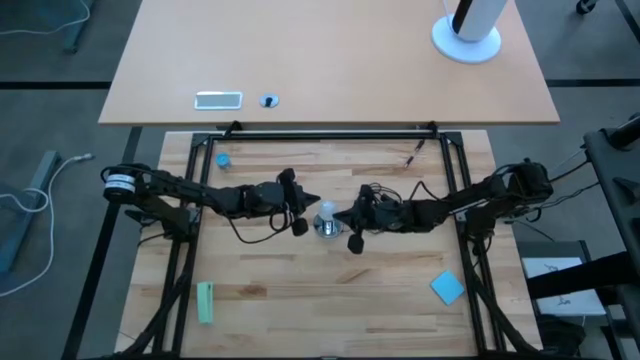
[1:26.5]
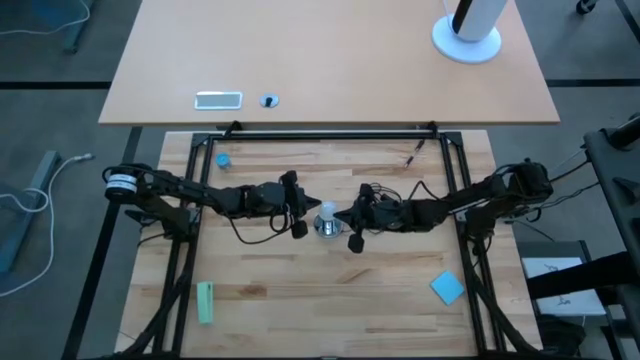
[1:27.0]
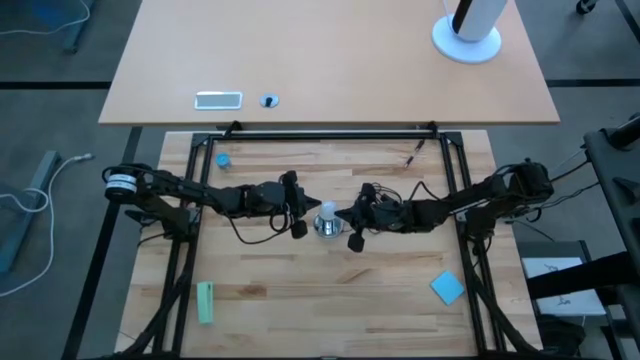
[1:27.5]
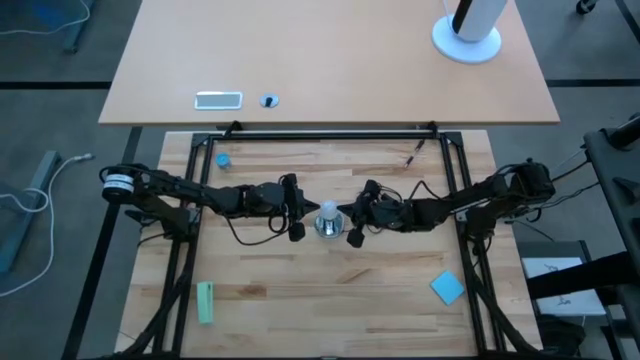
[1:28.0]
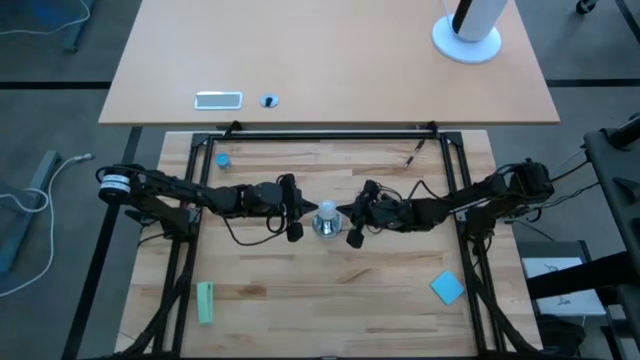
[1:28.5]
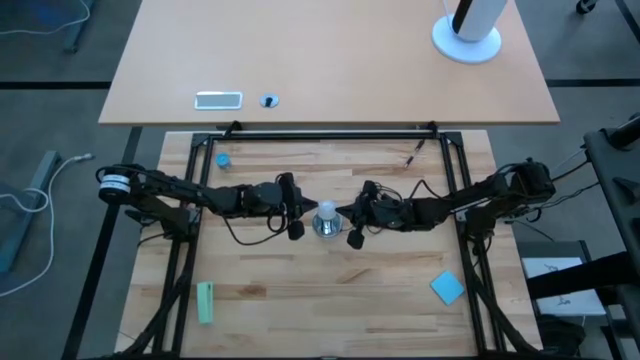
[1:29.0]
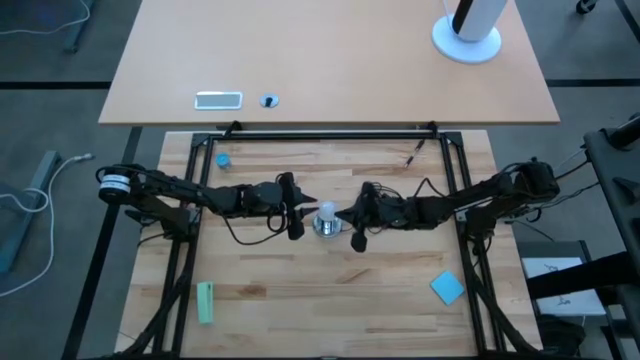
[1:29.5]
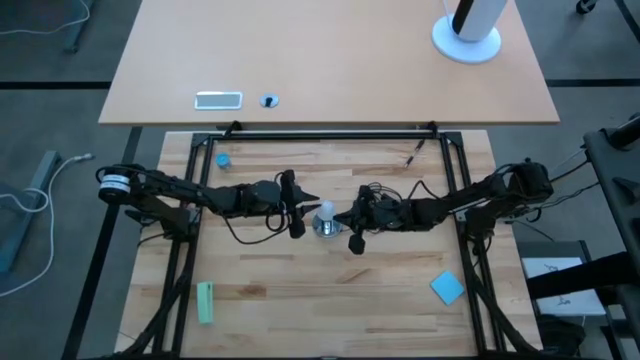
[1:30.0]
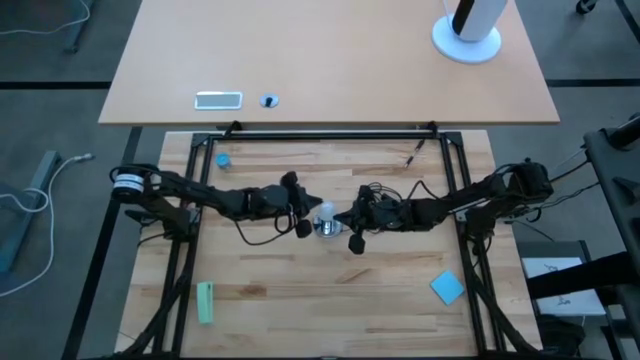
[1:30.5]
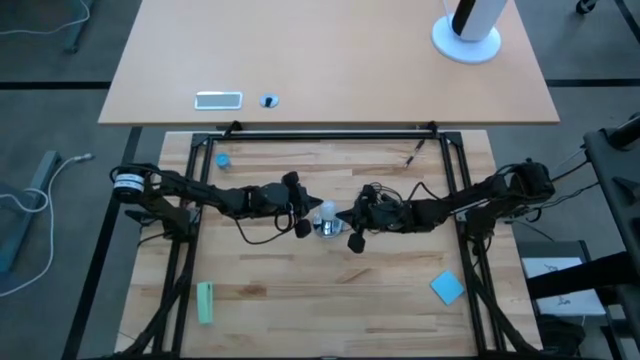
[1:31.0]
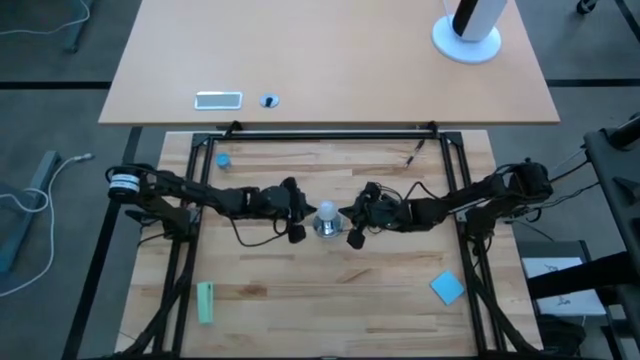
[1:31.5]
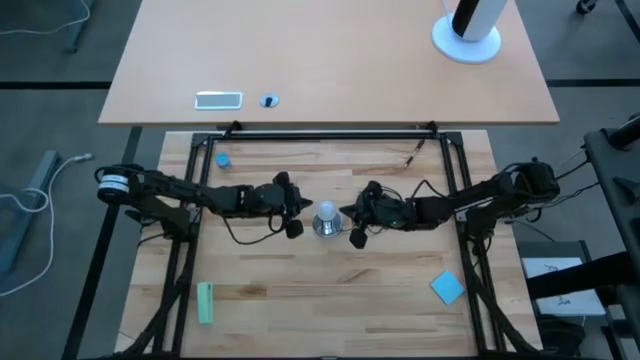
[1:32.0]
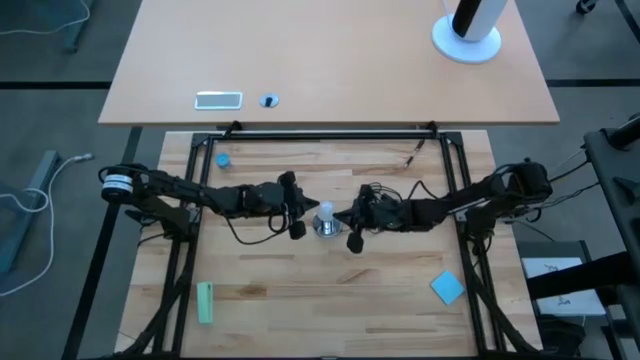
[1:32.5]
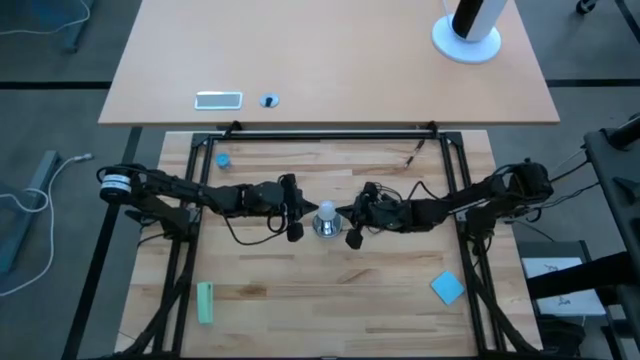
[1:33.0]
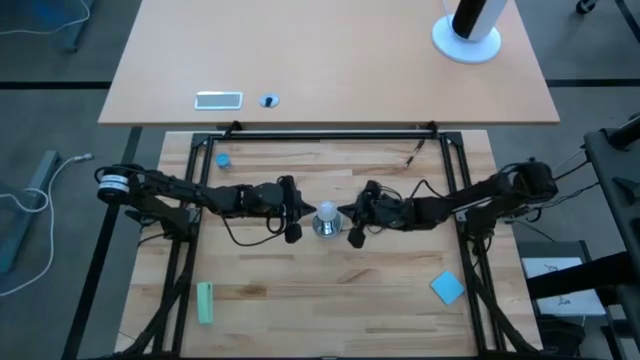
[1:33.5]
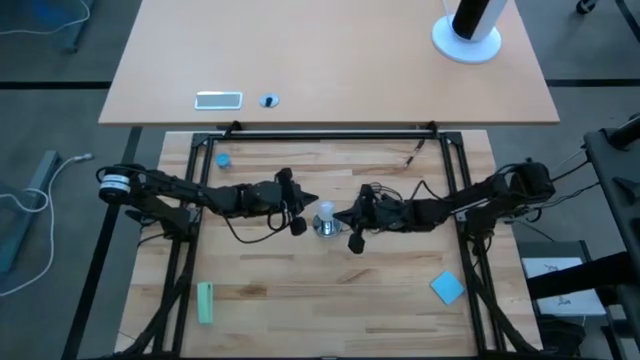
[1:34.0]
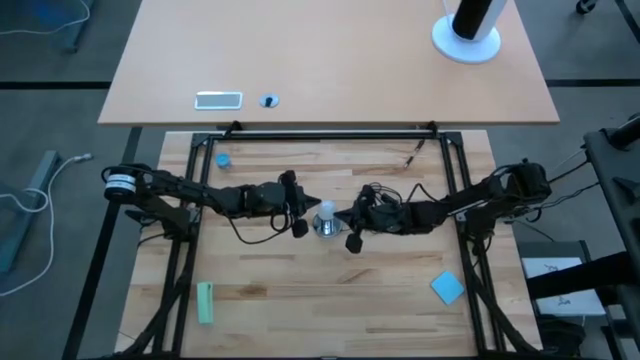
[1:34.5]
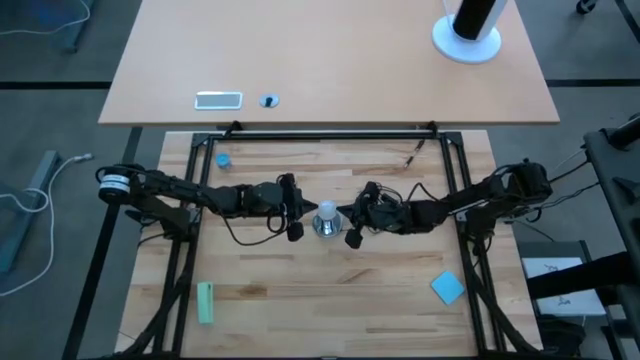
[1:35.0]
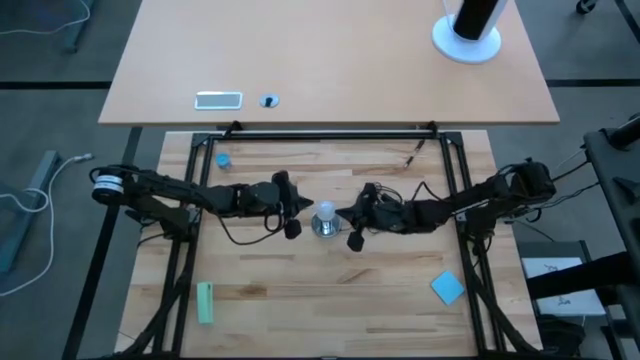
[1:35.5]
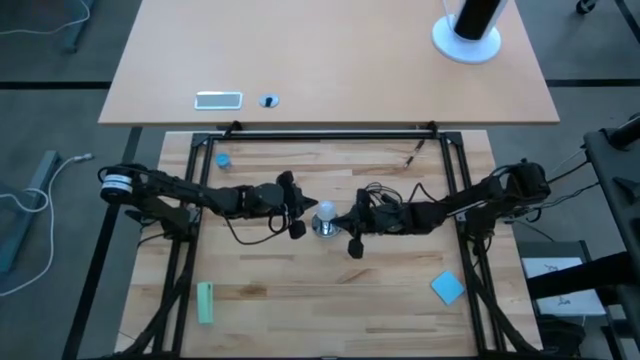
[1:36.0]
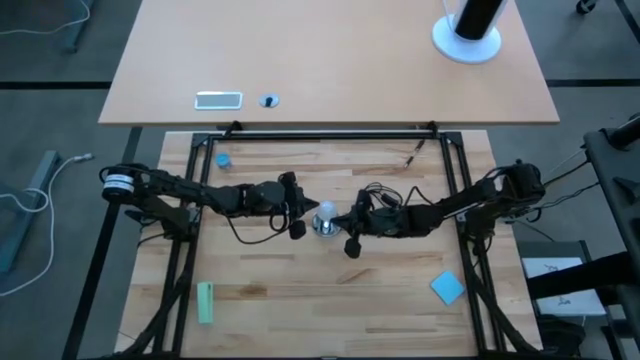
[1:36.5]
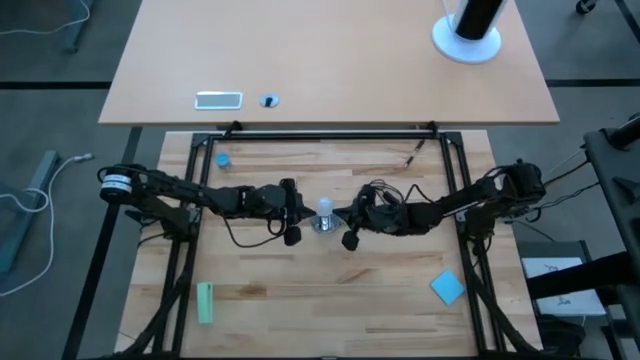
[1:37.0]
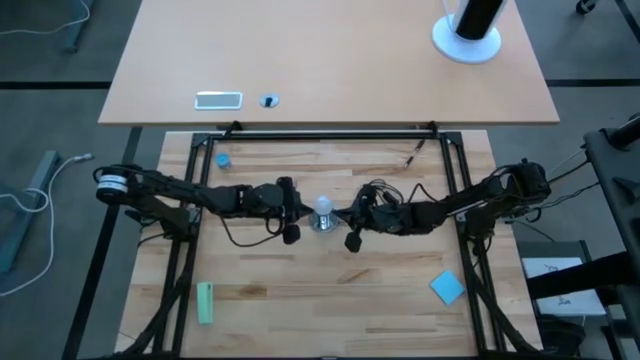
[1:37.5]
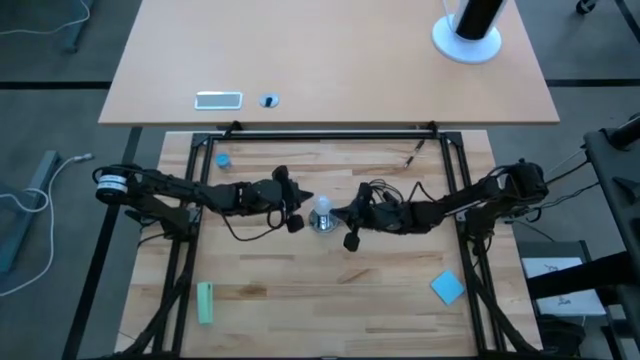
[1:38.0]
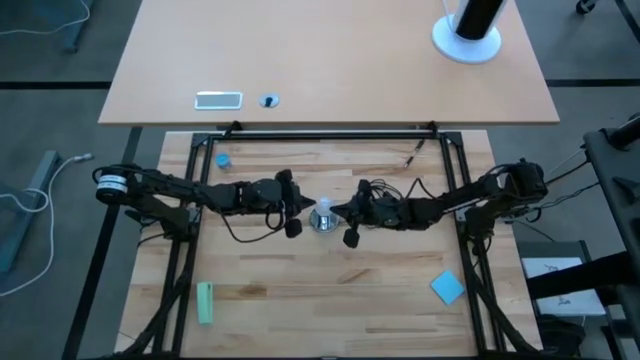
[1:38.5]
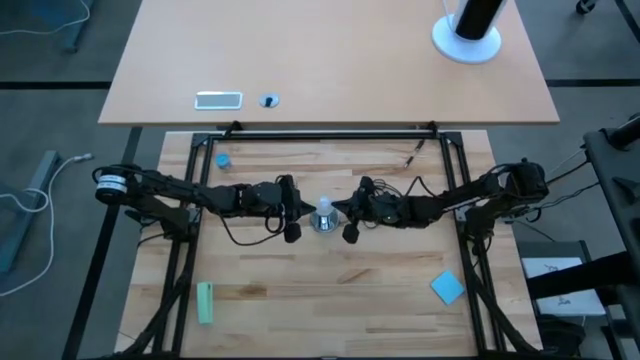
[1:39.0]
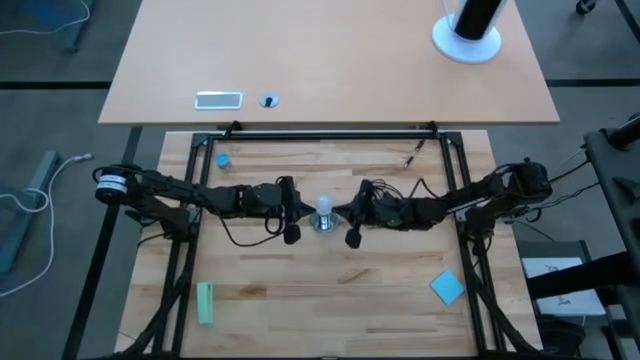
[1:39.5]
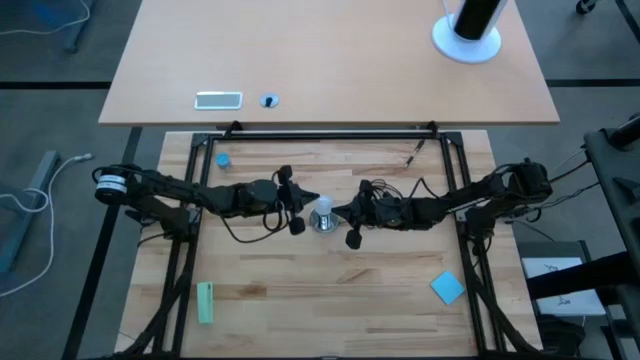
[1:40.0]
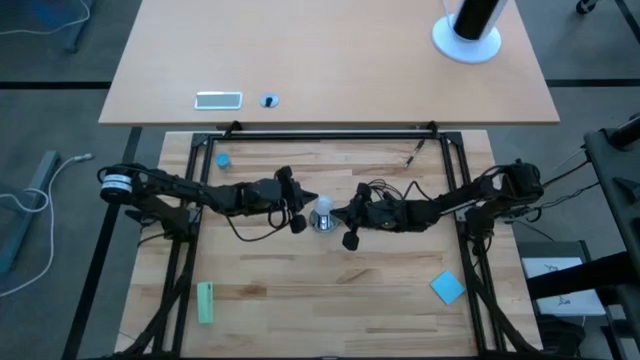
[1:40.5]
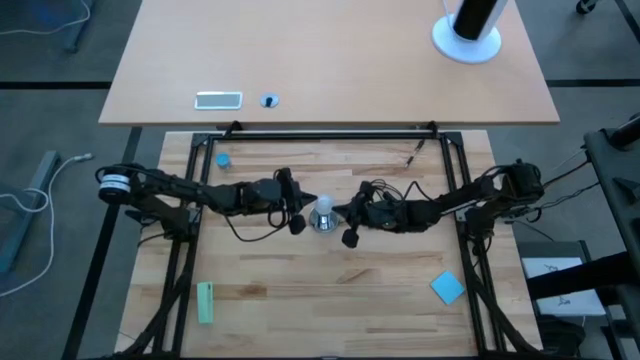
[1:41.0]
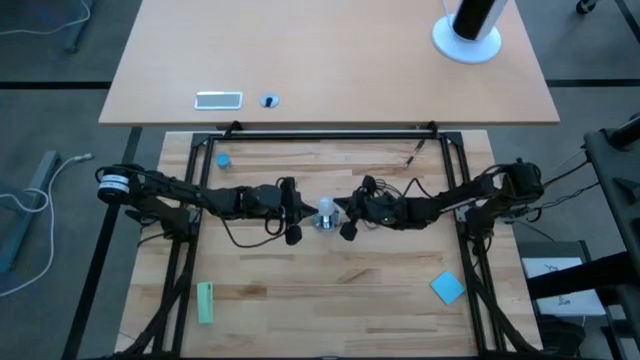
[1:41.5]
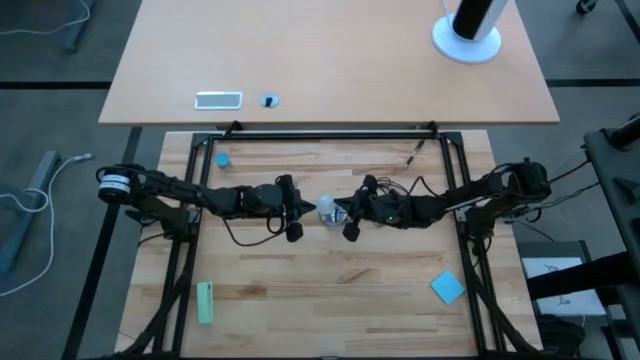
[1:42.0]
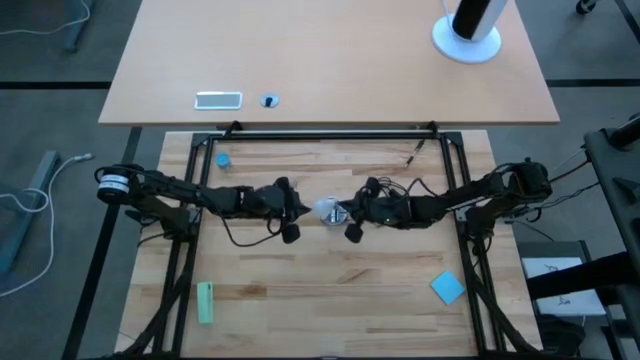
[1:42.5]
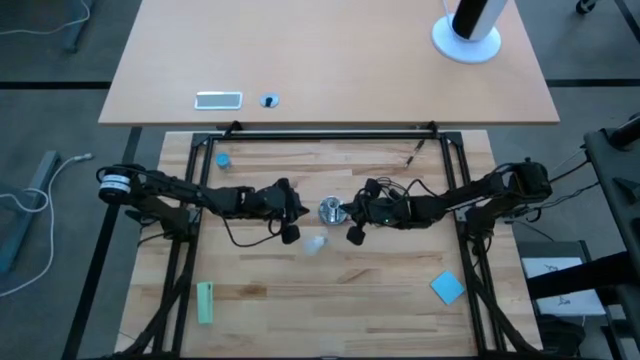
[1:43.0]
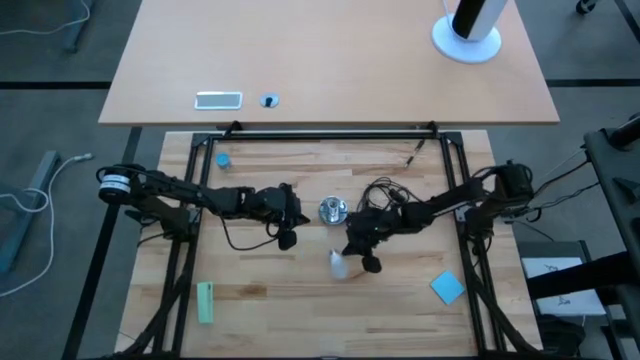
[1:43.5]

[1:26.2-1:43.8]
Task: Screw lightbulb
Remove the white lightbulb from the metal lamp

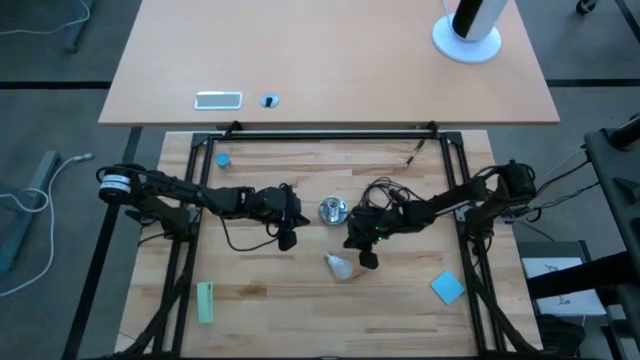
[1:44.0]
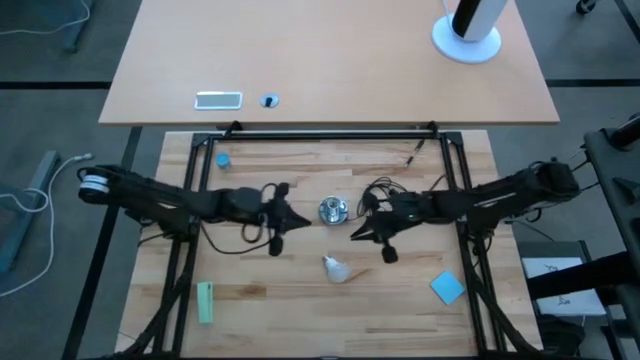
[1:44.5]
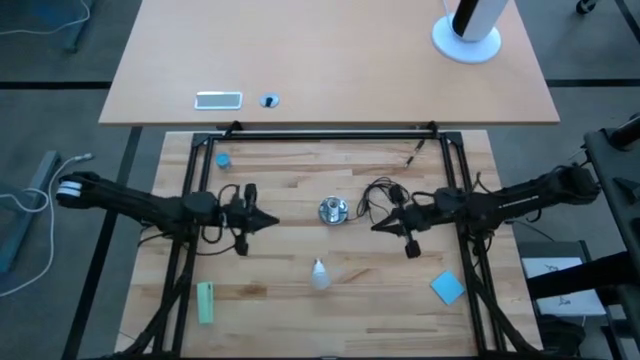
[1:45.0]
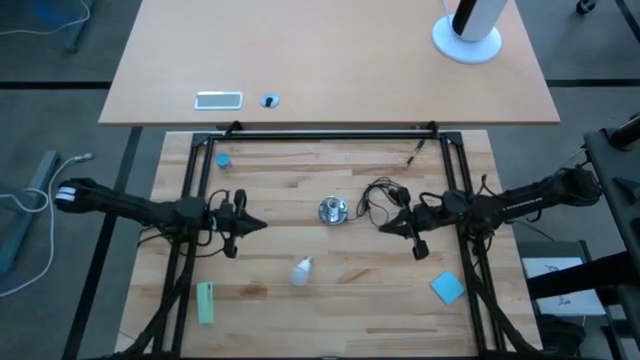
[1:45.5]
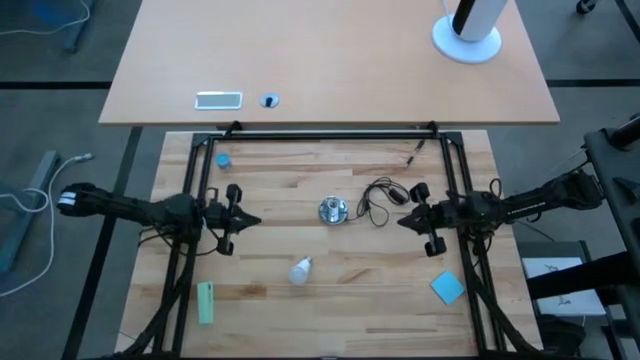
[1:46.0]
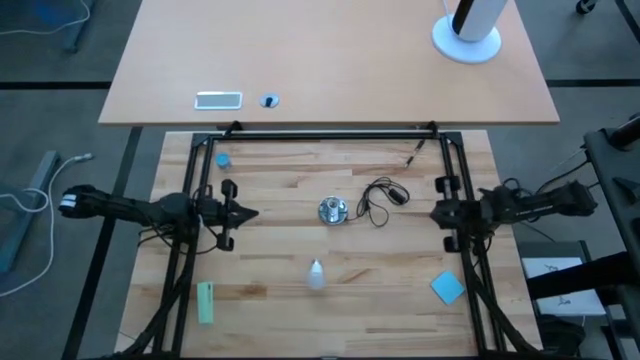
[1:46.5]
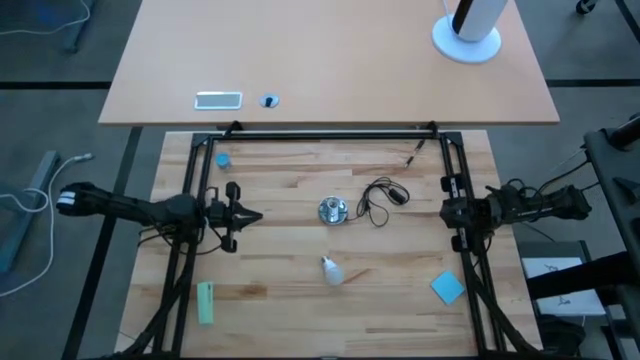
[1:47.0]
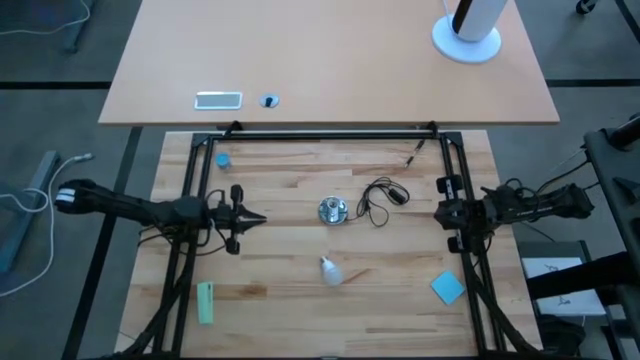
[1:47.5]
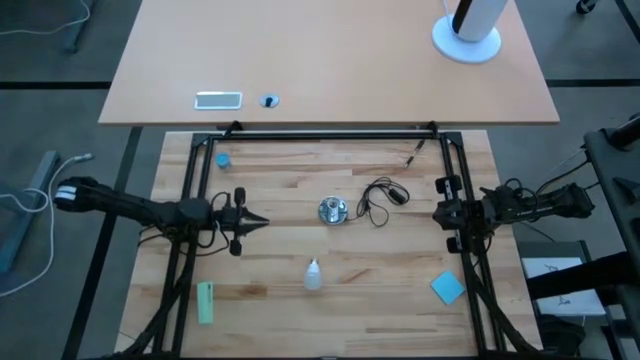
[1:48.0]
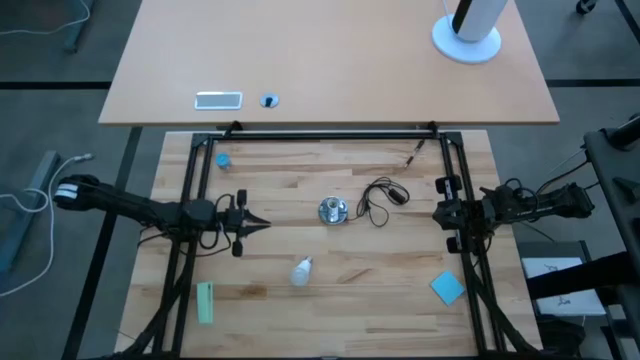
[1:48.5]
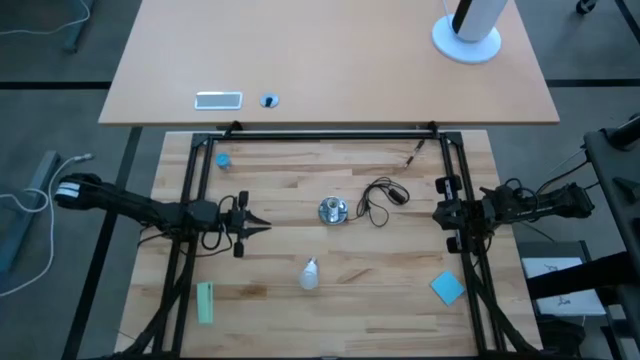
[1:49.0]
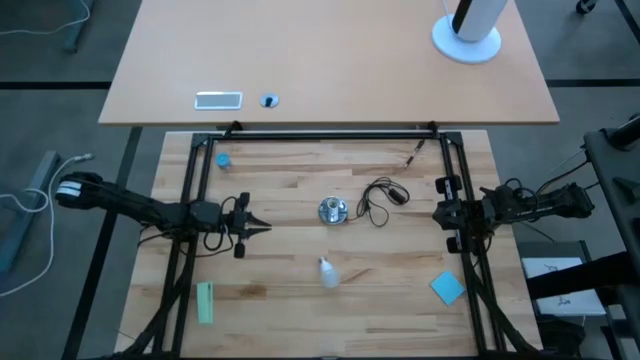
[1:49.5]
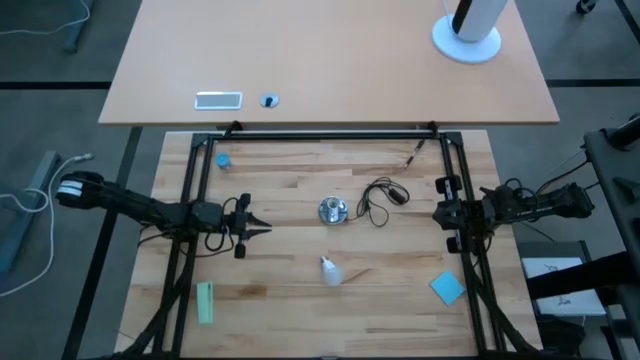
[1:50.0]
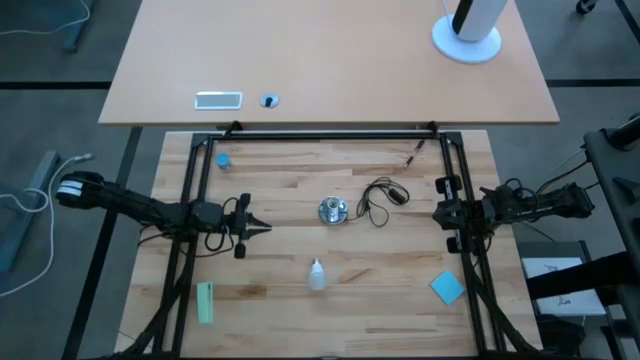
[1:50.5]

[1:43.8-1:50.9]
Return to Home Position
